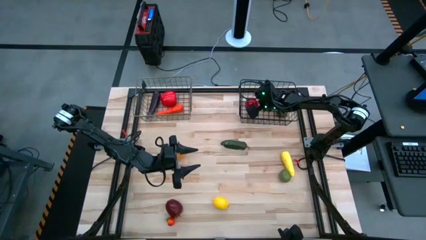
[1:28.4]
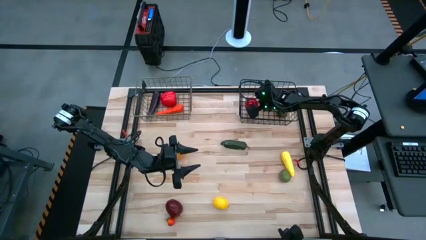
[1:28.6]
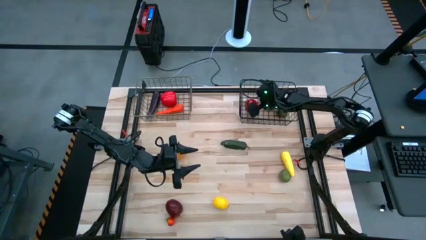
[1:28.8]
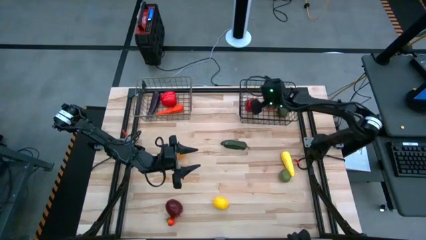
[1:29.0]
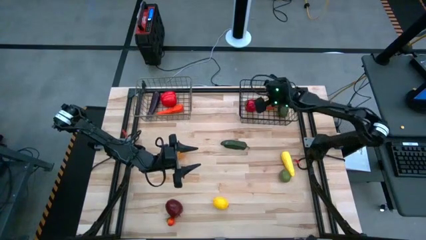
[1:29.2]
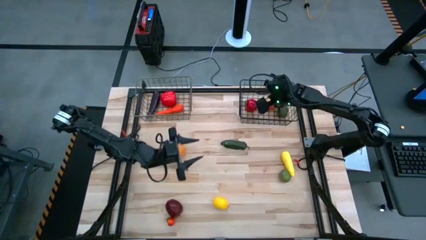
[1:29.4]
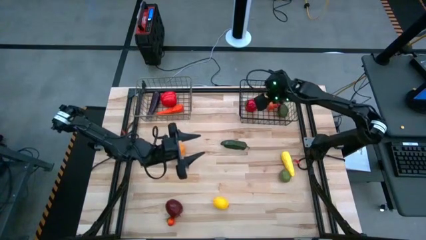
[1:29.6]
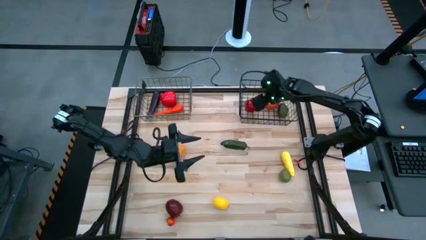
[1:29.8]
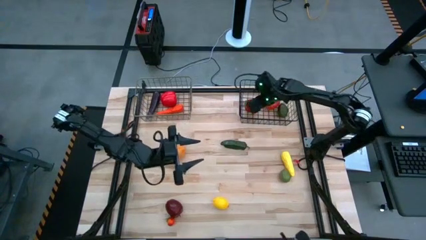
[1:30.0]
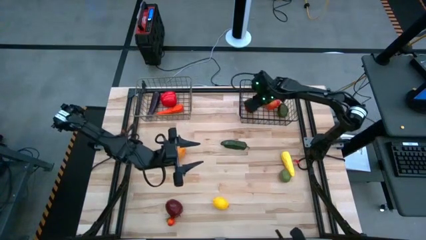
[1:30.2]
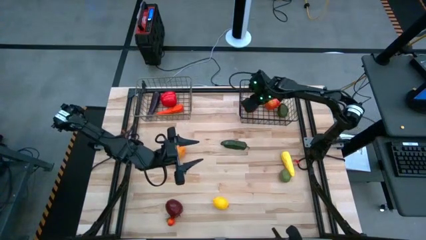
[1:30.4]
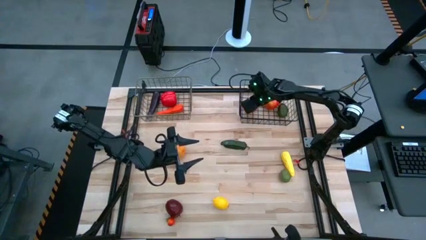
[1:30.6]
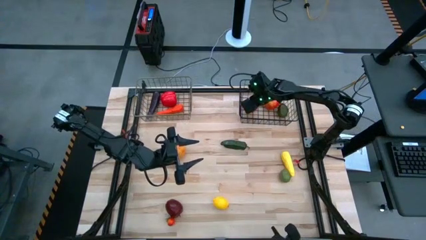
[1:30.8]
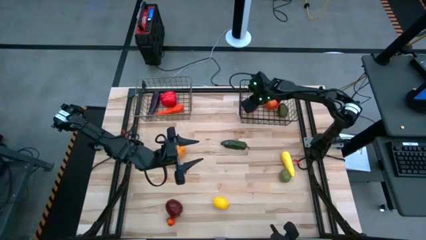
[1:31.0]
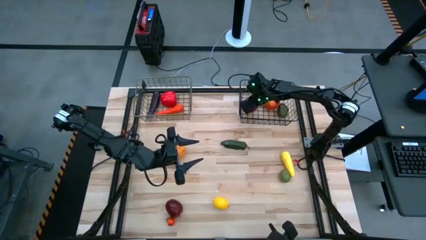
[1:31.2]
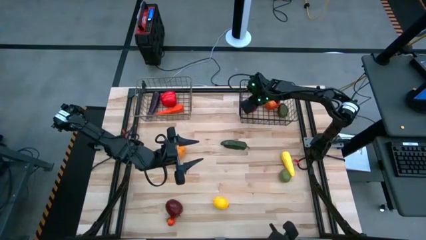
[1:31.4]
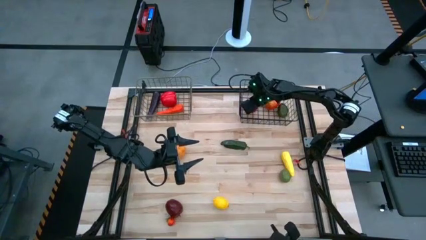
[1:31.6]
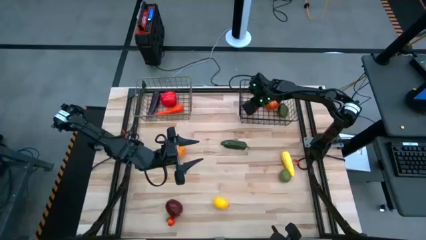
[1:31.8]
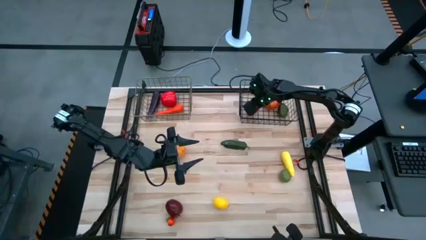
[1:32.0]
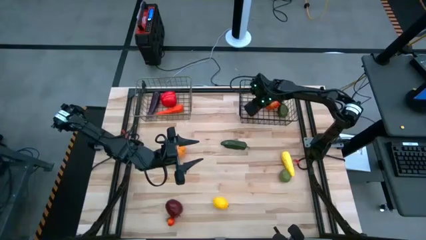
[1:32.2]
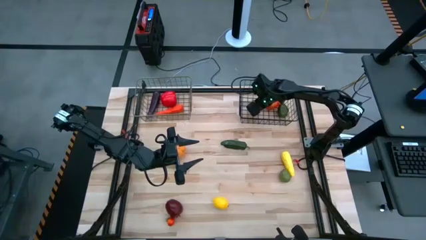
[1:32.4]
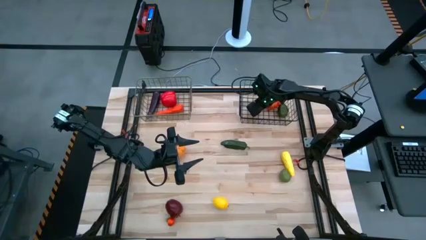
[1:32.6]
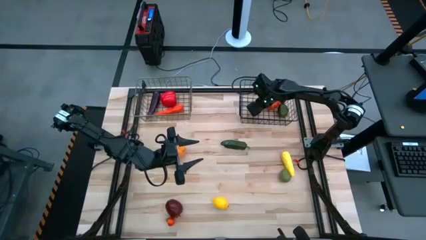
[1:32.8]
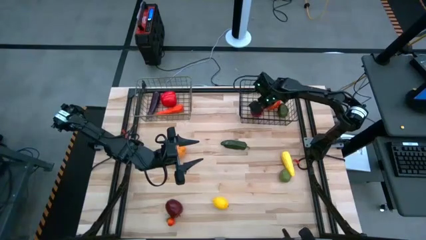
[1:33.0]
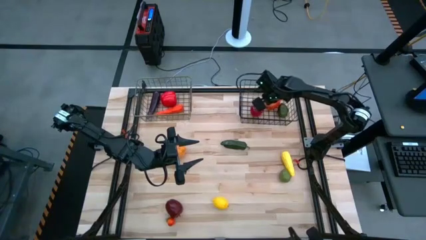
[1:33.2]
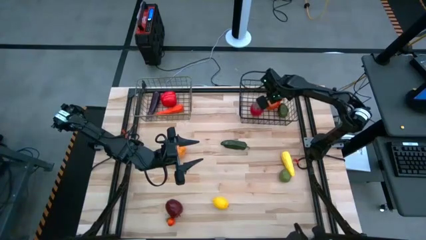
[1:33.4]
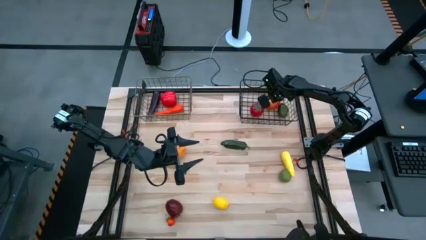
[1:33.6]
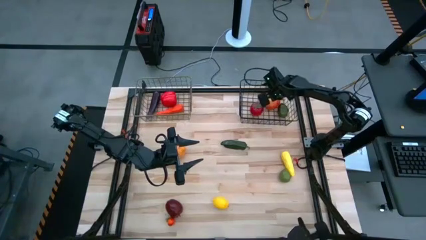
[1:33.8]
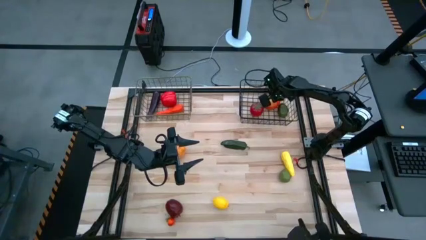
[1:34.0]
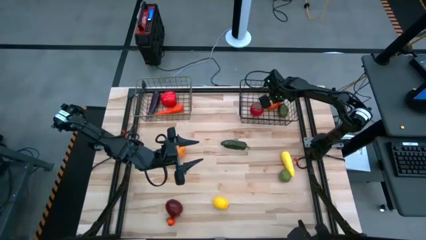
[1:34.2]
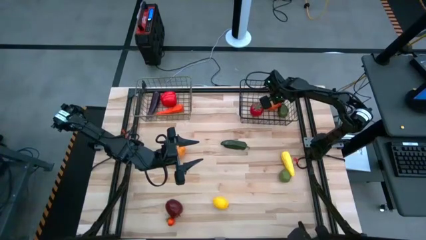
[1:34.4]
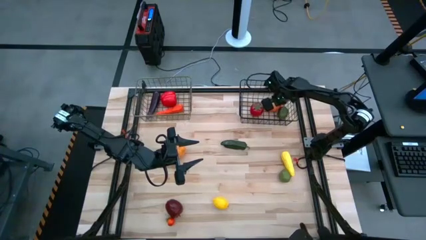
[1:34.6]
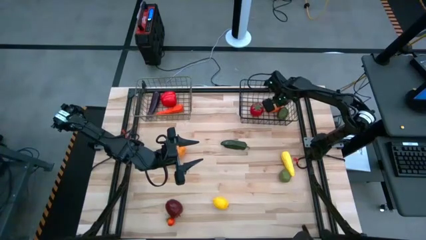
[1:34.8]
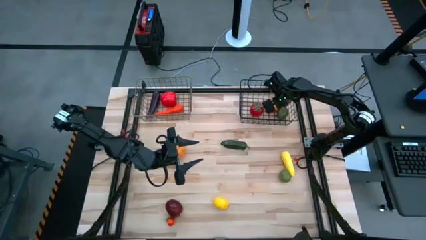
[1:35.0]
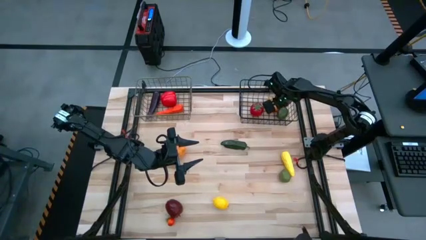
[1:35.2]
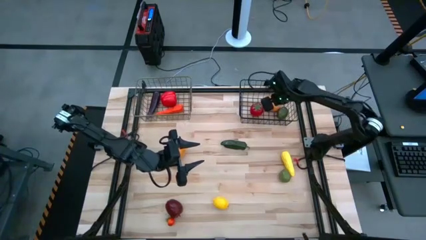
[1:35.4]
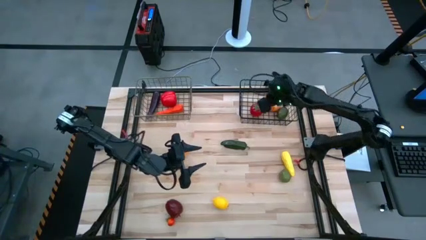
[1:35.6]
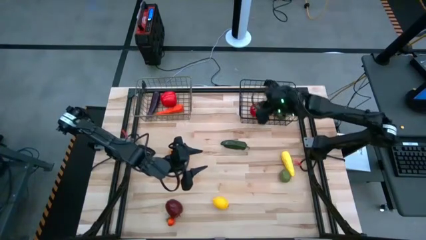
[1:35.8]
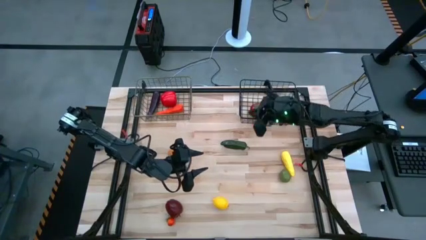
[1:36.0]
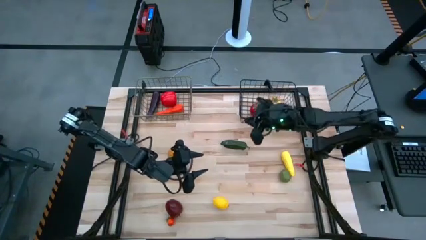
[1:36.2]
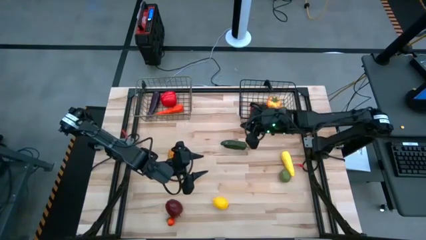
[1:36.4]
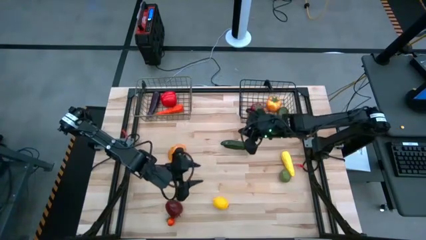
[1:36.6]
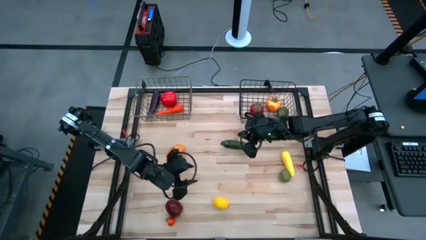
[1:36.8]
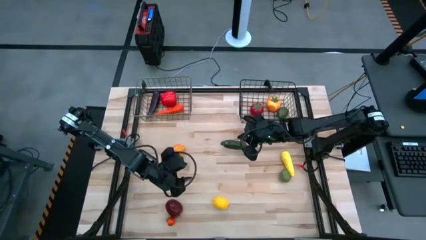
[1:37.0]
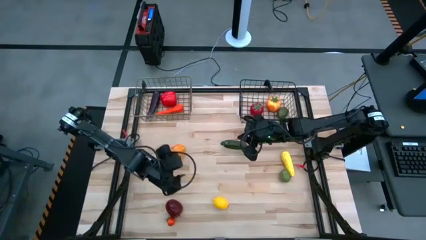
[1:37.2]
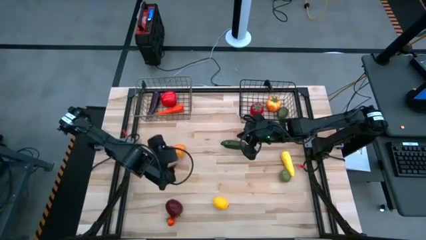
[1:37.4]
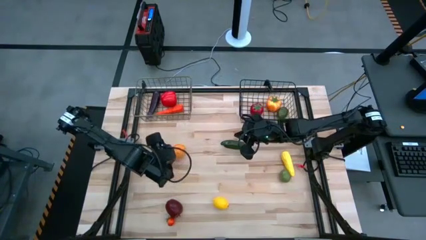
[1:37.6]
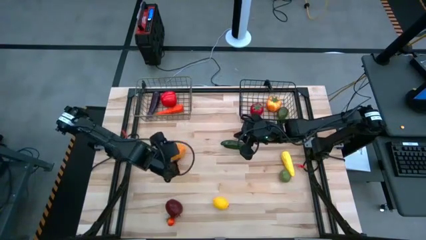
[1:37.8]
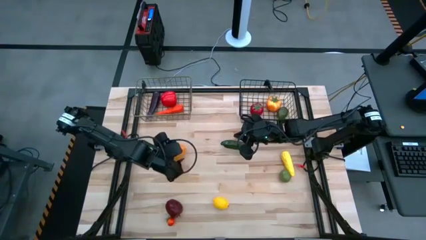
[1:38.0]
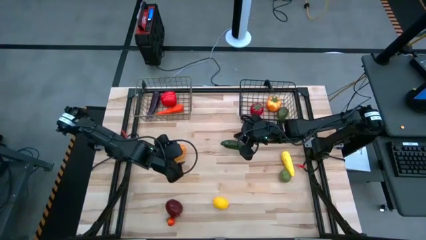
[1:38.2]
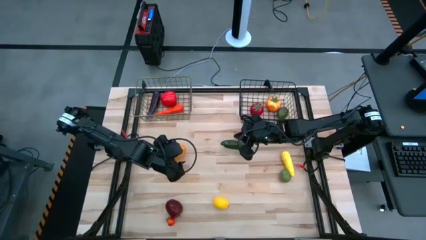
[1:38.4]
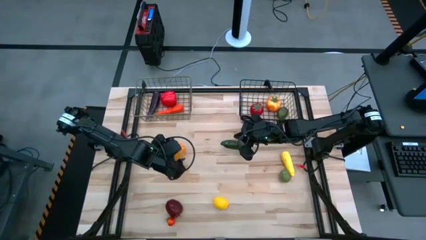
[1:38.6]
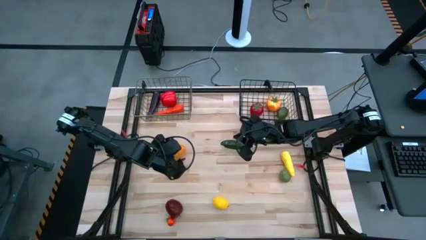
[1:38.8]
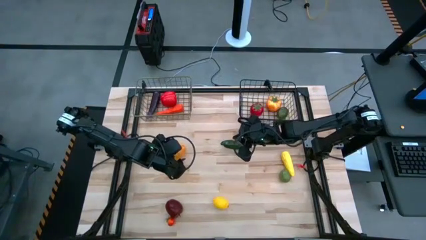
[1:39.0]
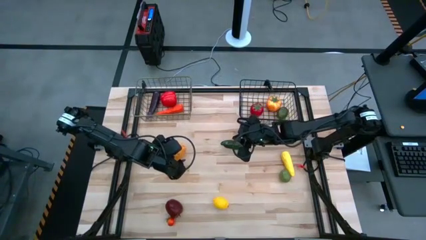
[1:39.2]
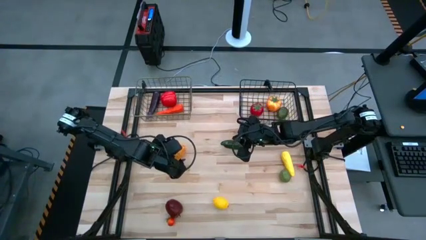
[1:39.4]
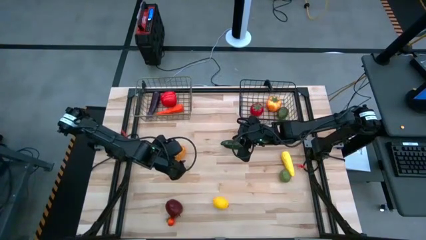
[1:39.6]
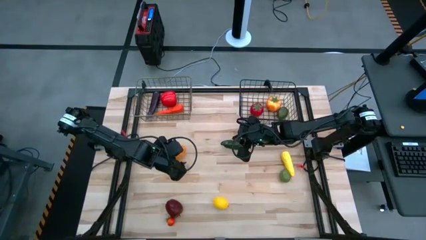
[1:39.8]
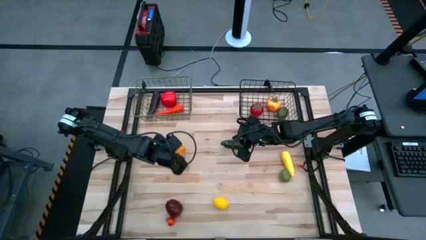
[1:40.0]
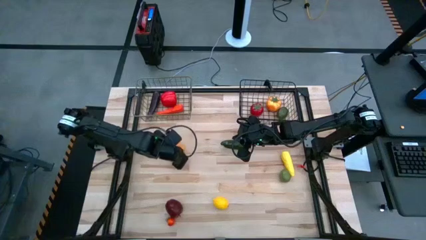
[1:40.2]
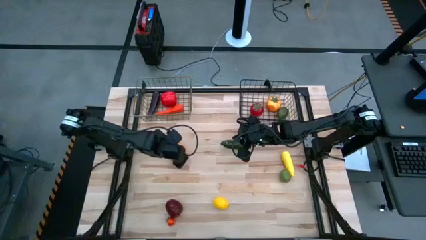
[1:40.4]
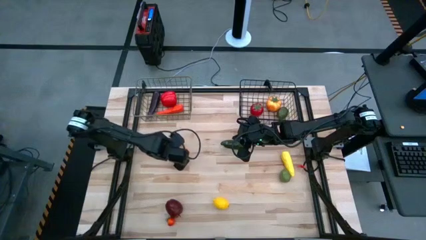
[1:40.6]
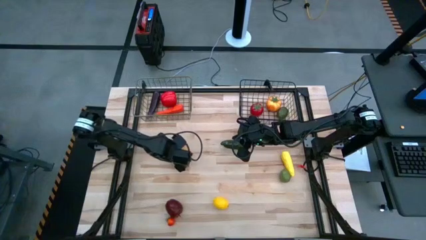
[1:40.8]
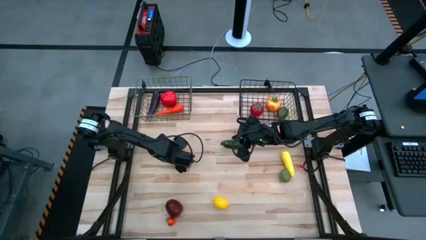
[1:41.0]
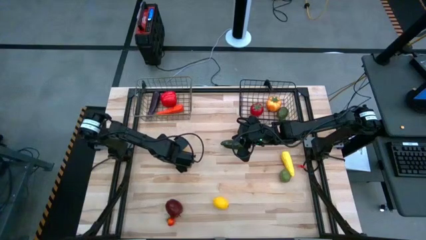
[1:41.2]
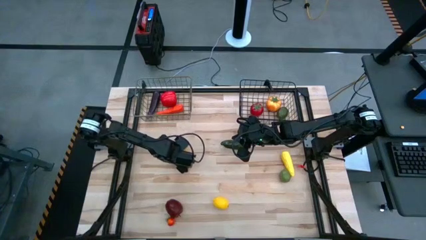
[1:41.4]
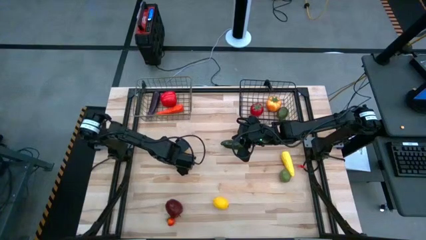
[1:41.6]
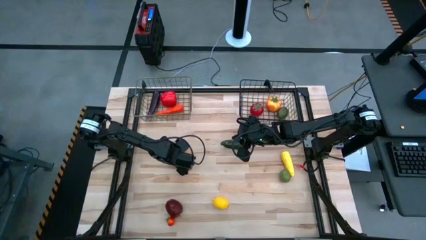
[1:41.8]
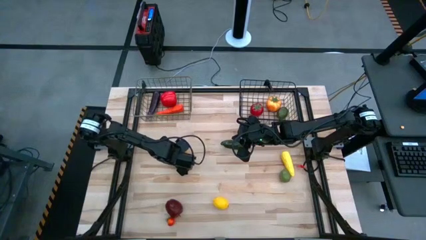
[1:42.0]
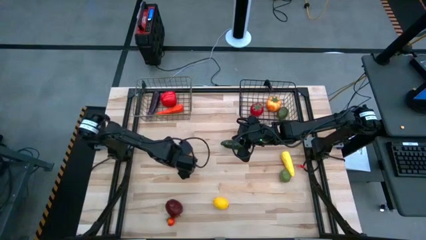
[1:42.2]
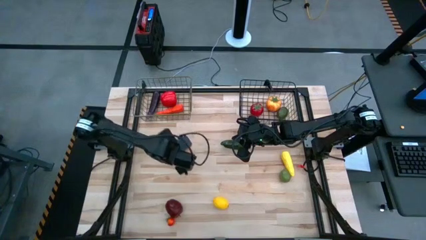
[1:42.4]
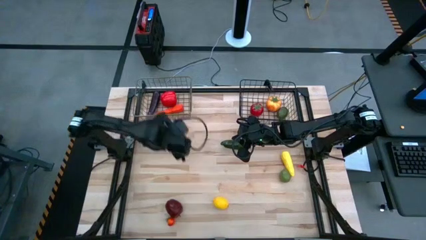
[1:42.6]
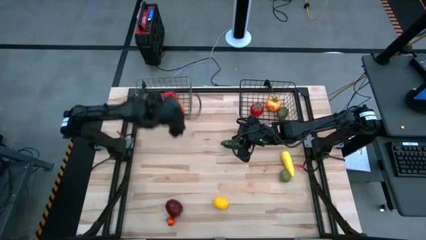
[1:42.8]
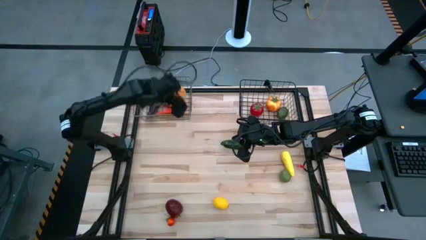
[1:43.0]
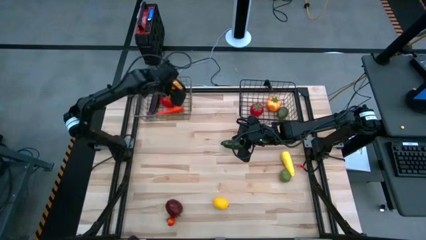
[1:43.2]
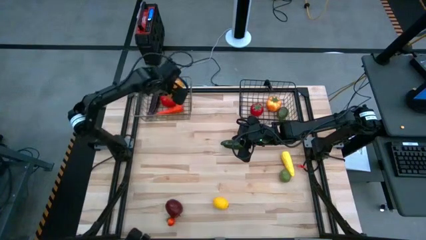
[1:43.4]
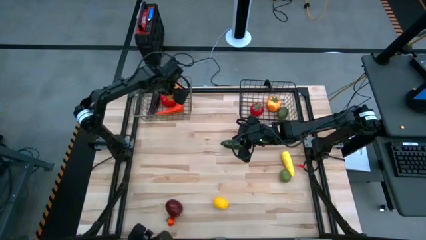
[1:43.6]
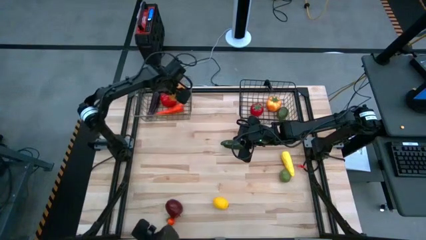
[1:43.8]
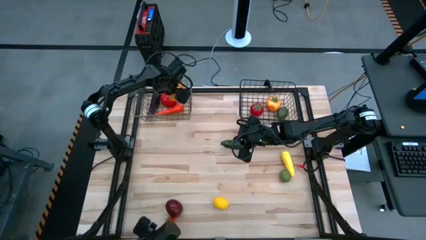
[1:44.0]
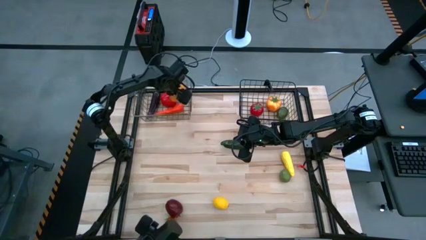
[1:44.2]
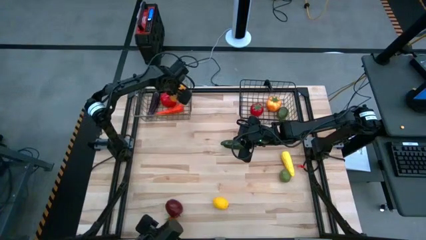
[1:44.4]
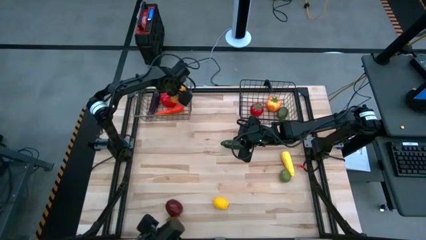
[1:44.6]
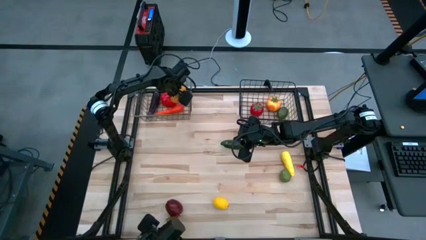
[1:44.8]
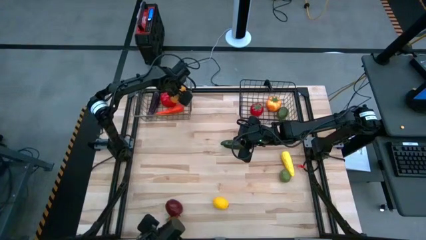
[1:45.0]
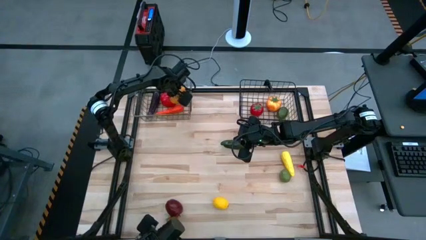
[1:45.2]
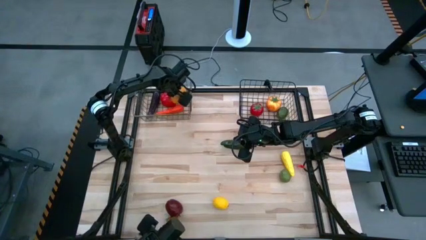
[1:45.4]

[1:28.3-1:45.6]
Task: Sort produce into baskets
Put the potato into the brown wire basket
